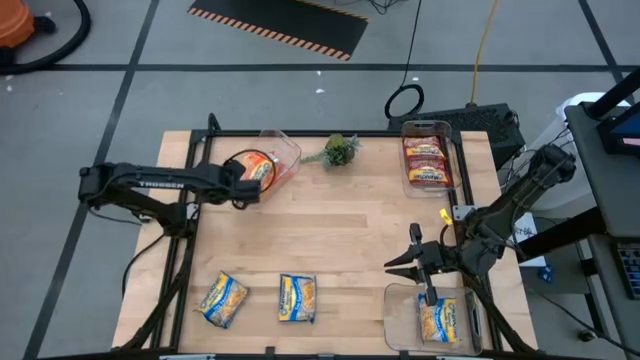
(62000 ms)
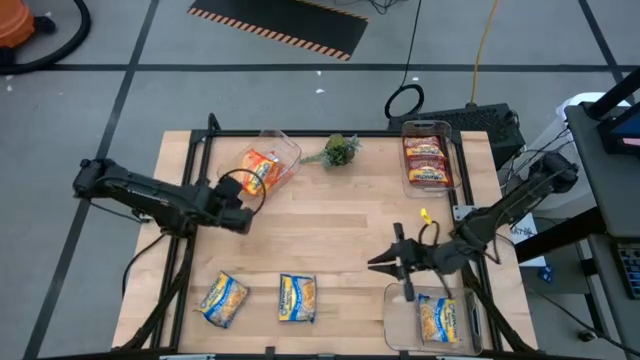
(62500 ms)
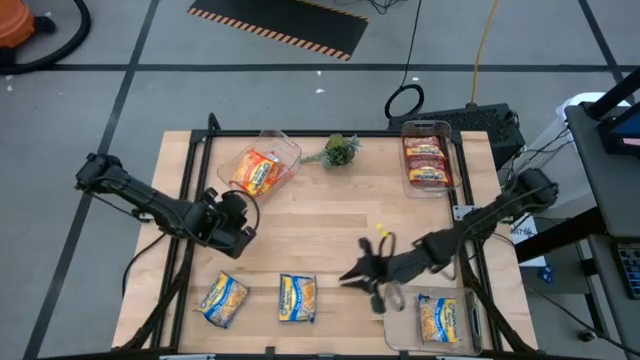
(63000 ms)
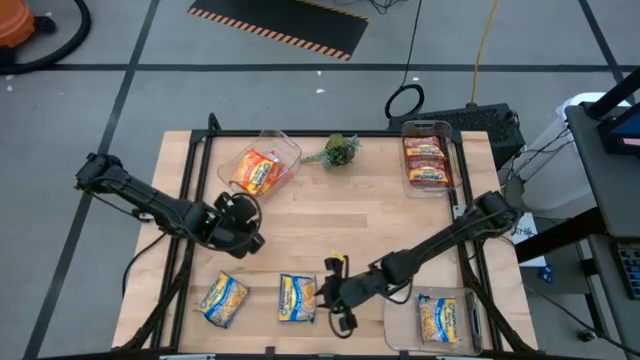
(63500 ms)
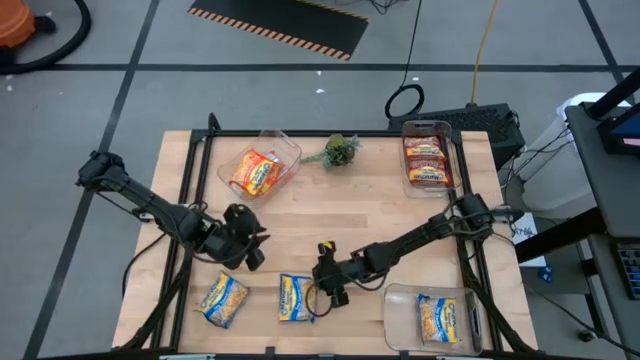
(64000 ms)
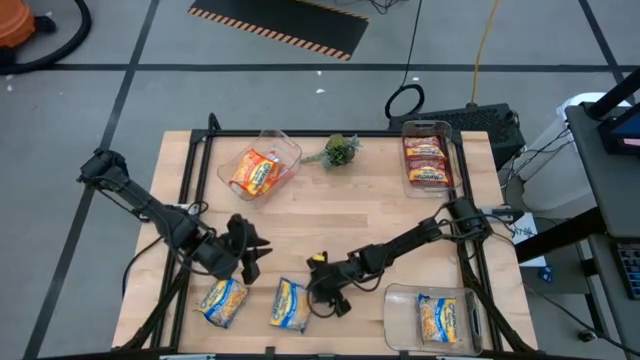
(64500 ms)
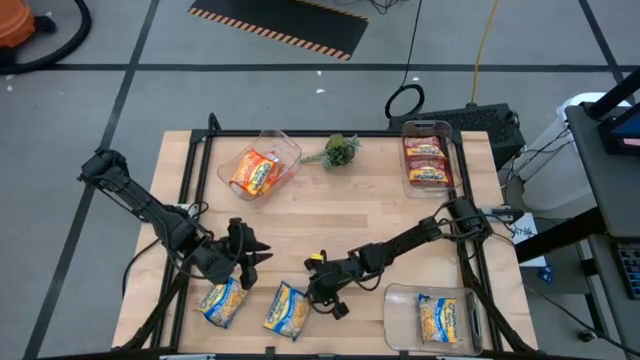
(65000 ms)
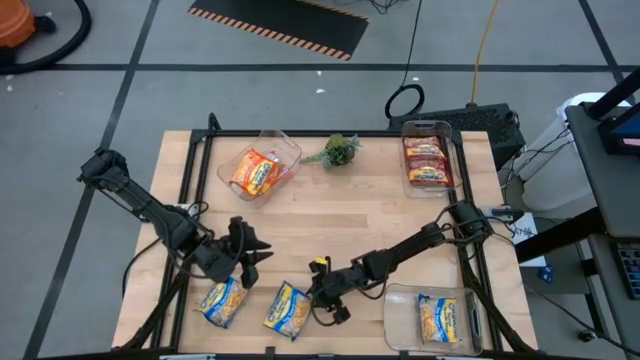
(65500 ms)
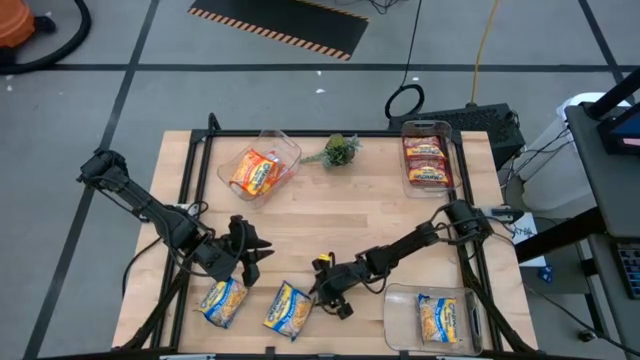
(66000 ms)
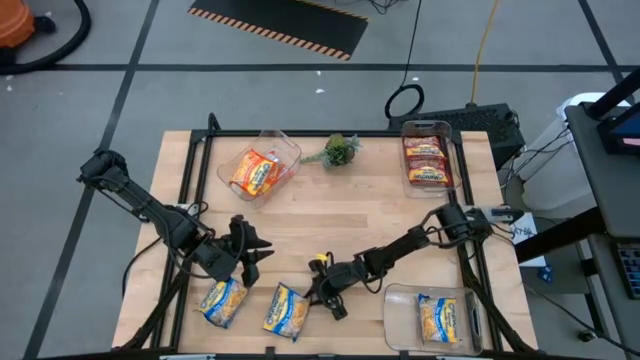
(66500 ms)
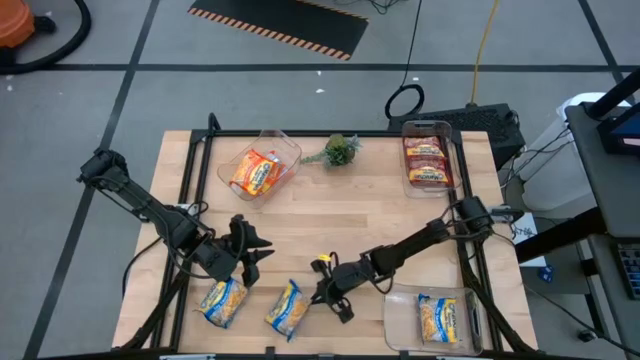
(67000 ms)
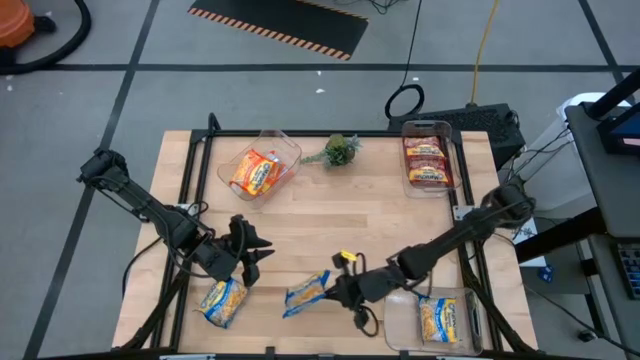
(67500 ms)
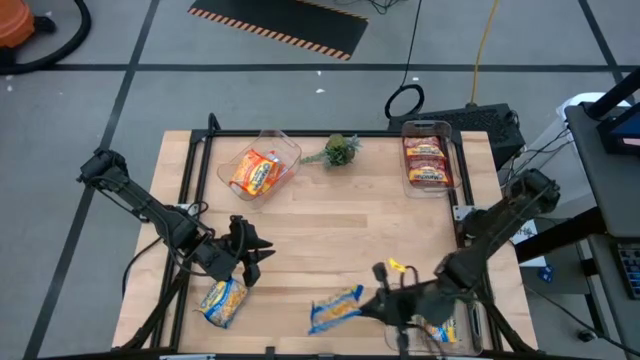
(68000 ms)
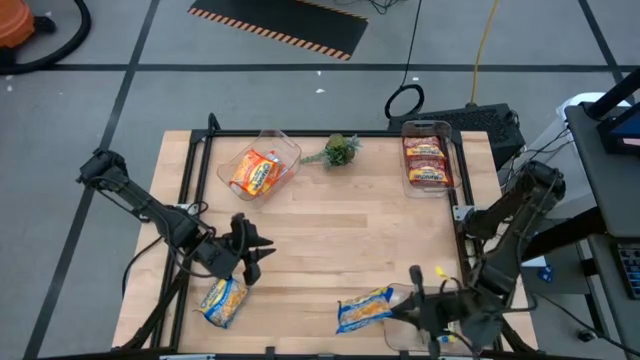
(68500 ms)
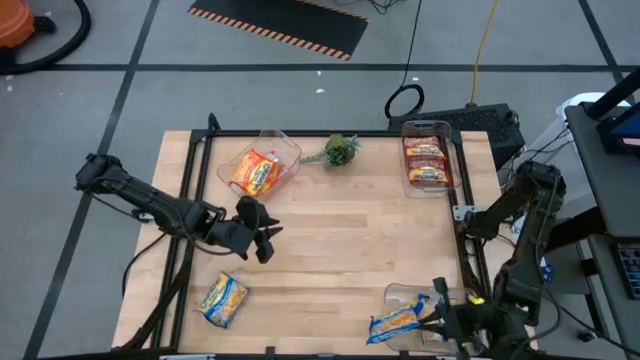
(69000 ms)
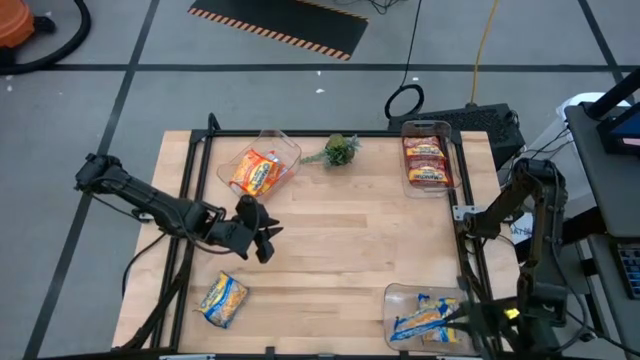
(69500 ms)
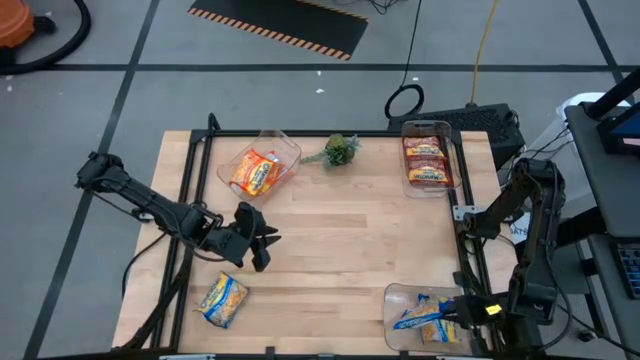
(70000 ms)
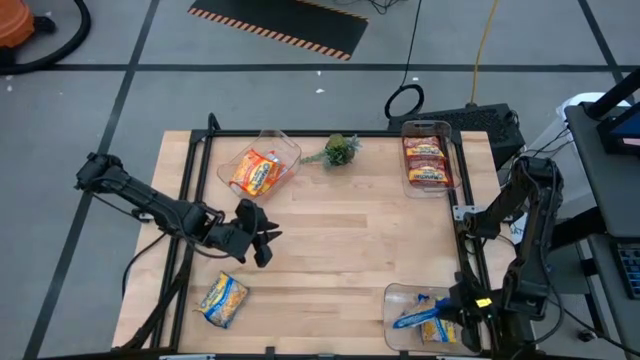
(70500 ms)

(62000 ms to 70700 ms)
Task: Sort Maruchan noodles
Put the right blue noodle pack into the bottom transparent bin

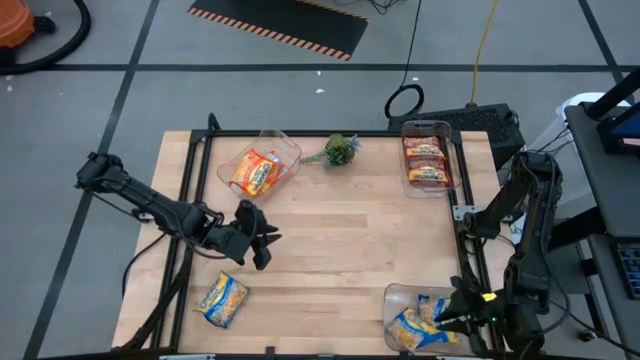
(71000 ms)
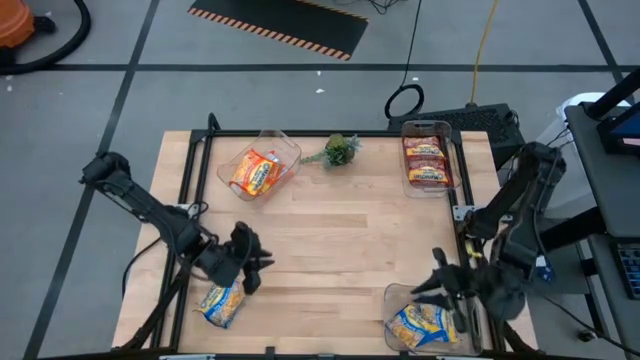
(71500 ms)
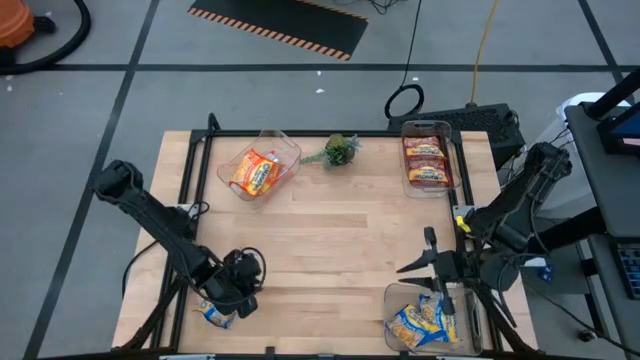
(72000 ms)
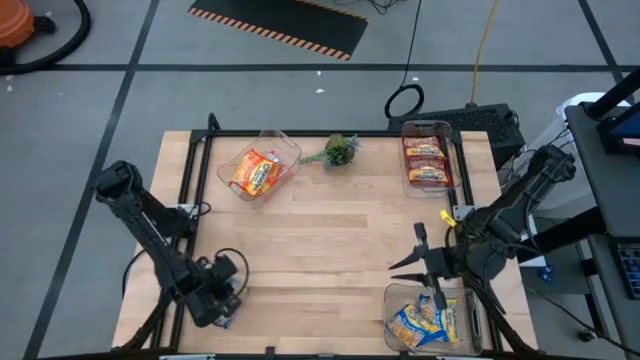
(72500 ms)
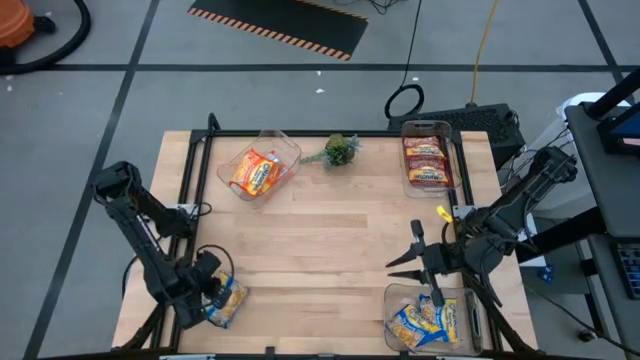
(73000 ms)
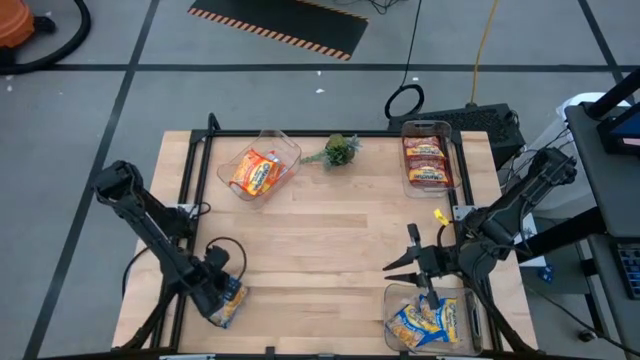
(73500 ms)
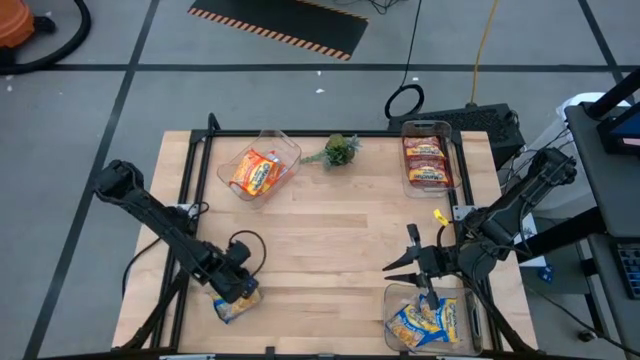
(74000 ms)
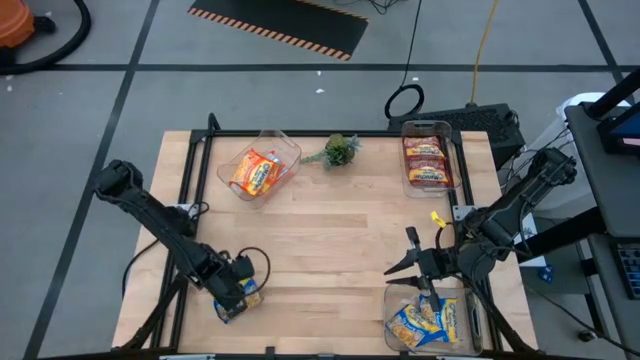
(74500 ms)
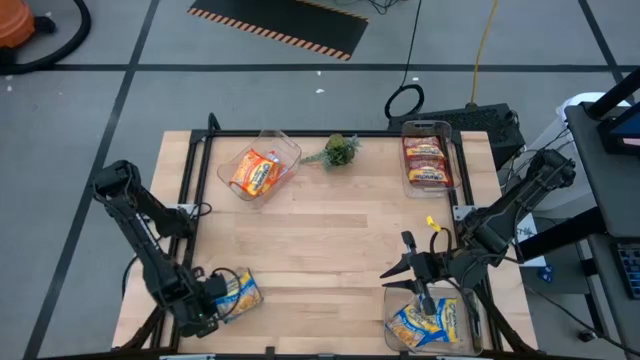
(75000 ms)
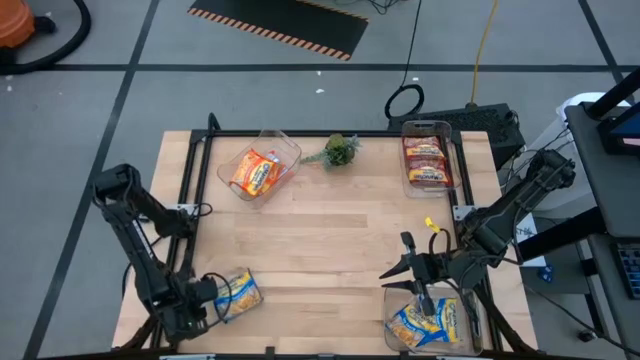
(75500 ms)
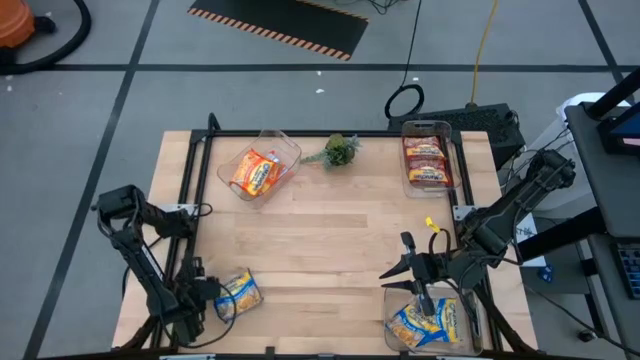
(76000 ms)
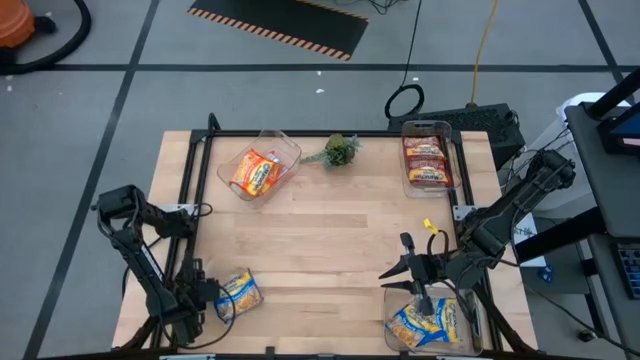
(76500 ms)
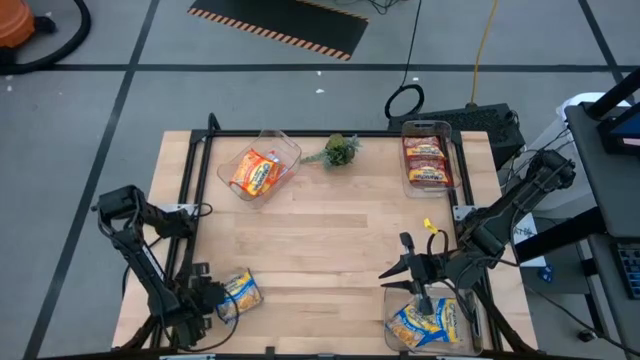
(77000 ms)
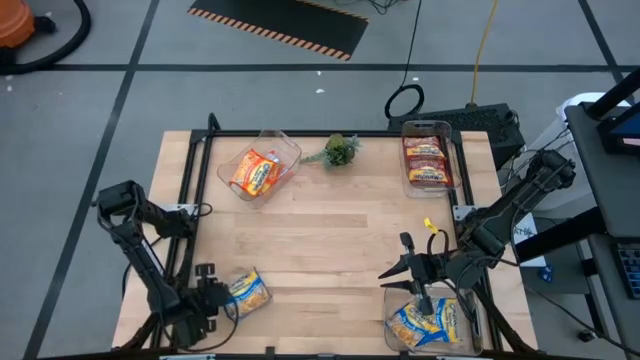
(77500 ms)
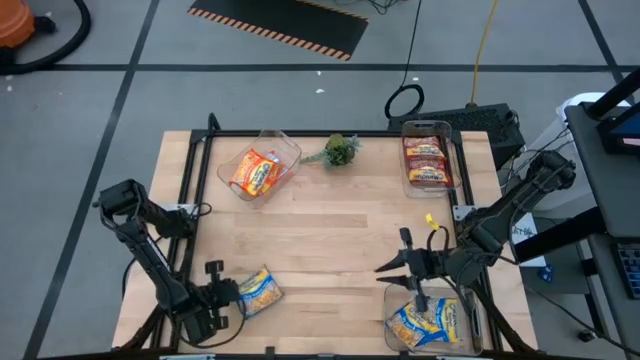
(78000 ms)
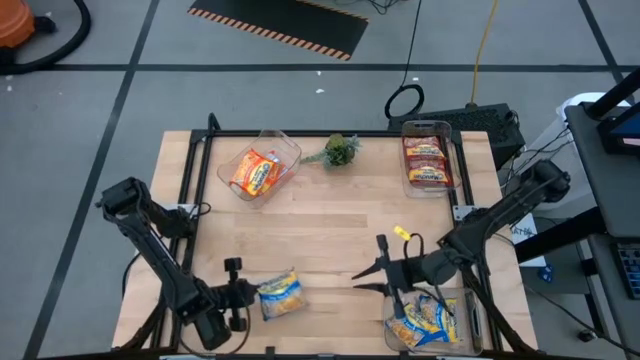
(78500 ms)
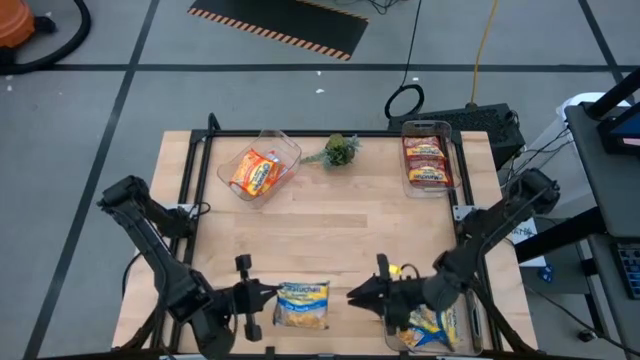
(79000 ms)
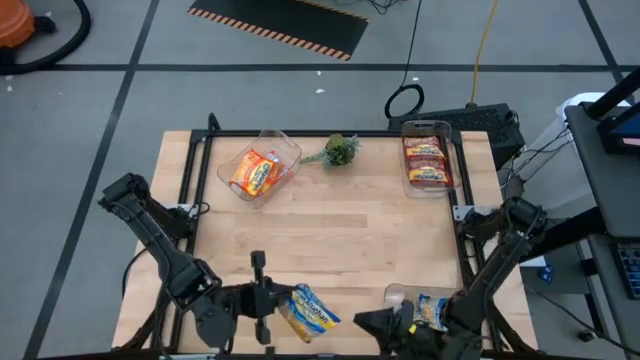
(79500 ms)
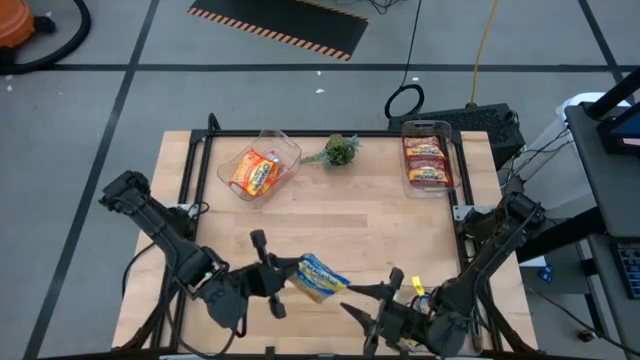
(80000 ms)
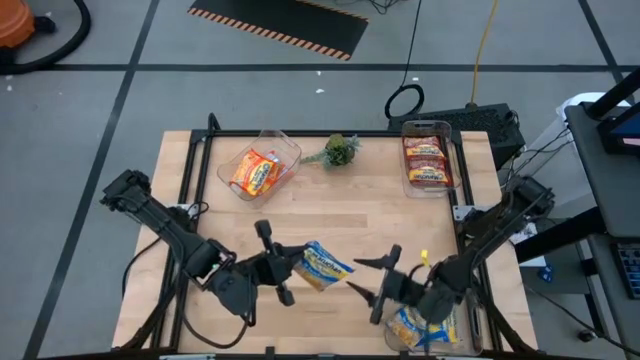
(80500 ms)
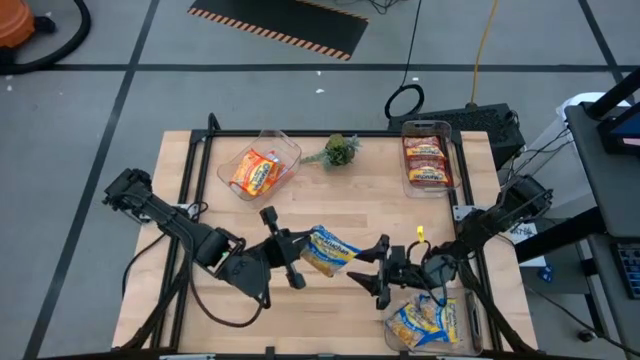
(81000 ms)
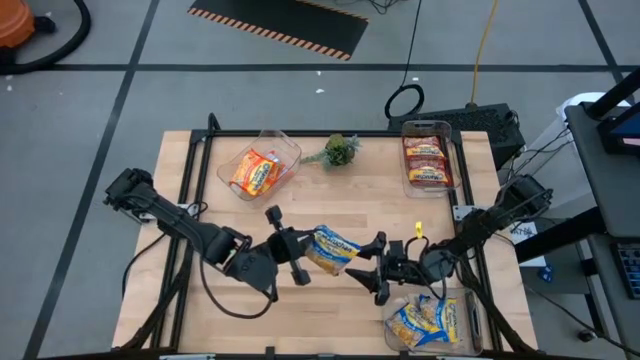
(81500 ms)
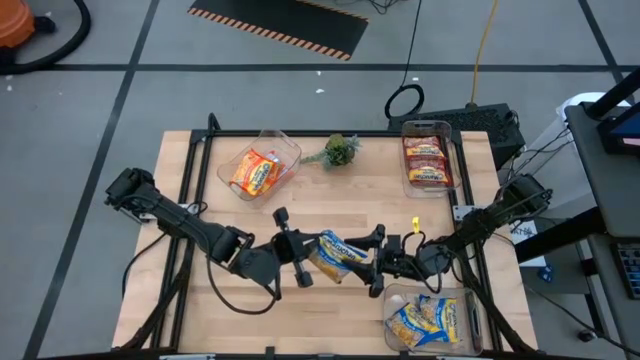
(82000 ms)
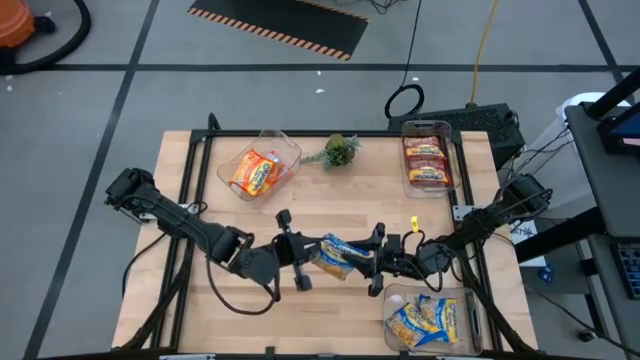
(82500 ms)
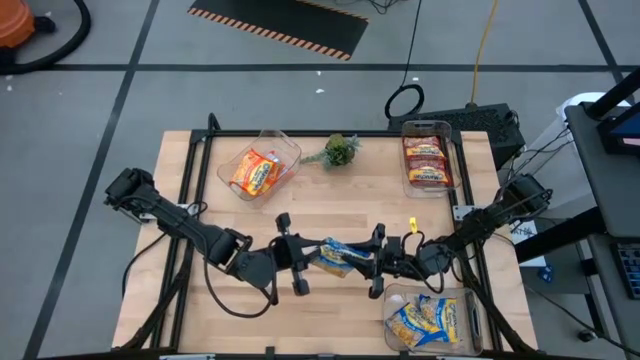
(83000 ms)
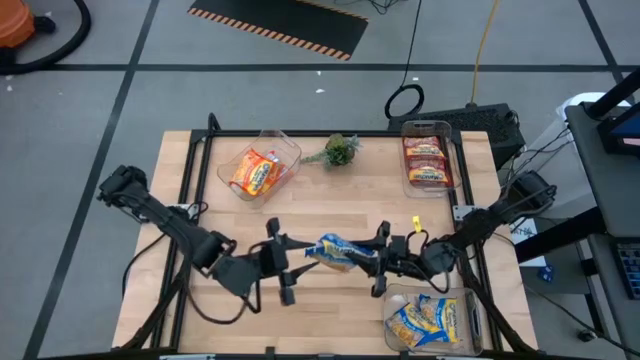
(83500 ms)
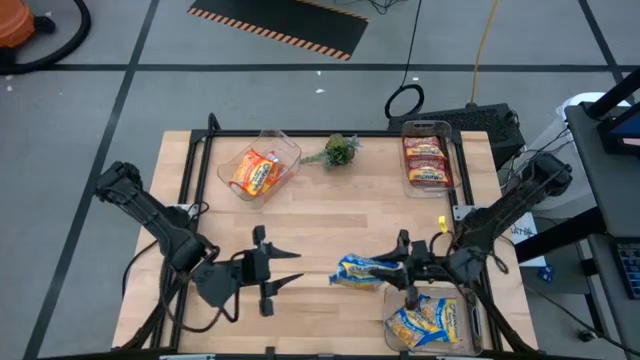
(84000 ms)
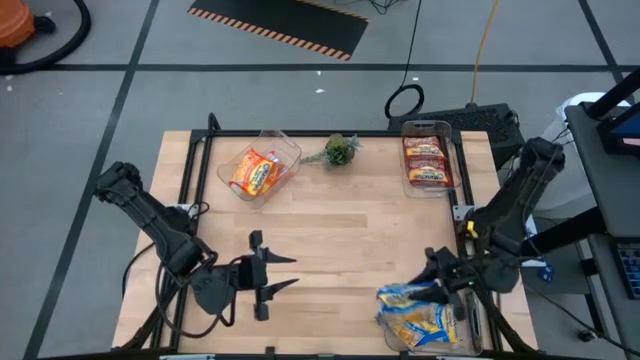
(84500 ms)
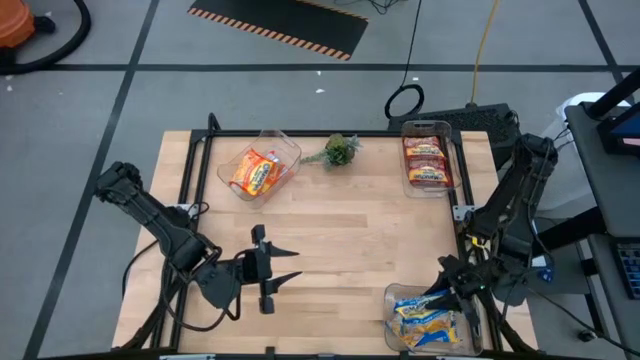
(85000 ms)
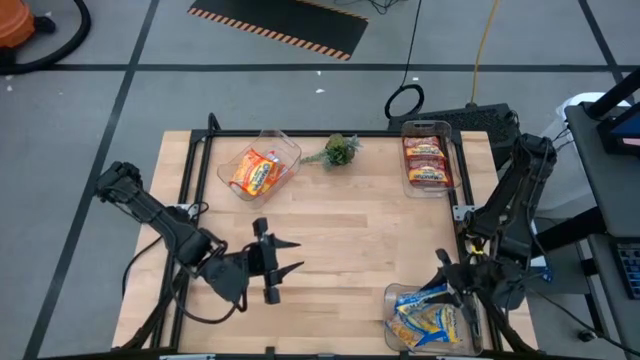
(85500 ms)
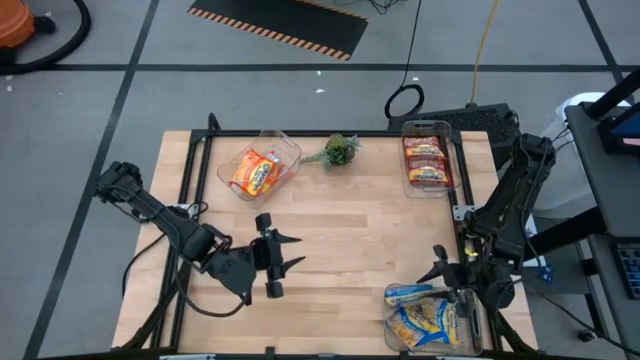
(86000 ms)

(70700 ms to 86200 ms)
Put the blue noodle pack into the bottom transparent bin
